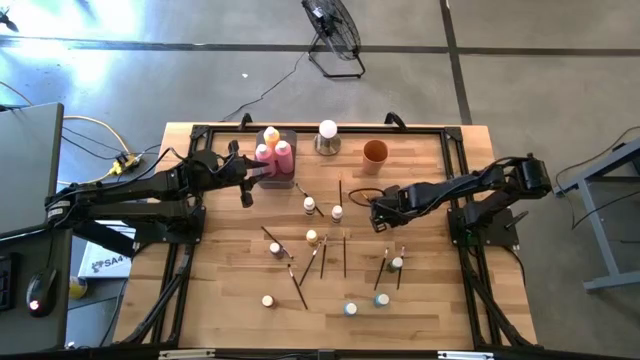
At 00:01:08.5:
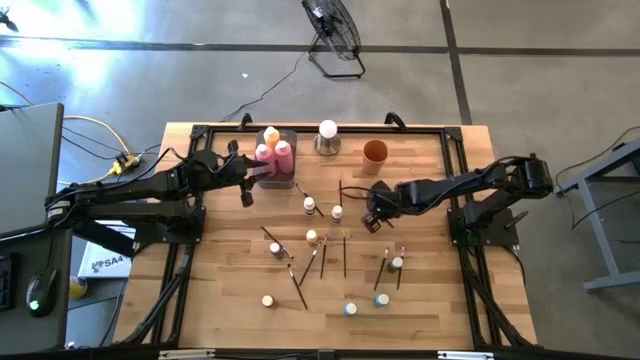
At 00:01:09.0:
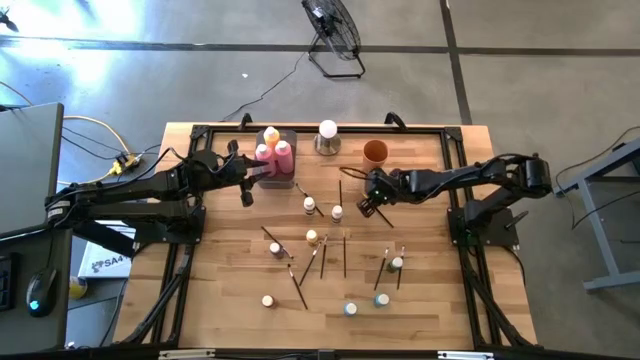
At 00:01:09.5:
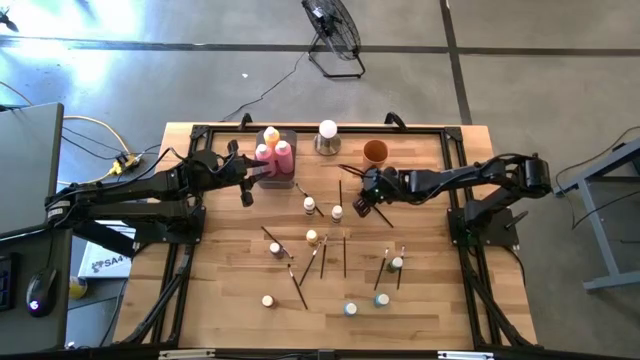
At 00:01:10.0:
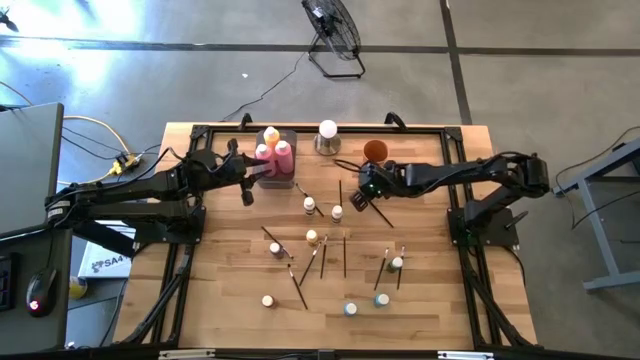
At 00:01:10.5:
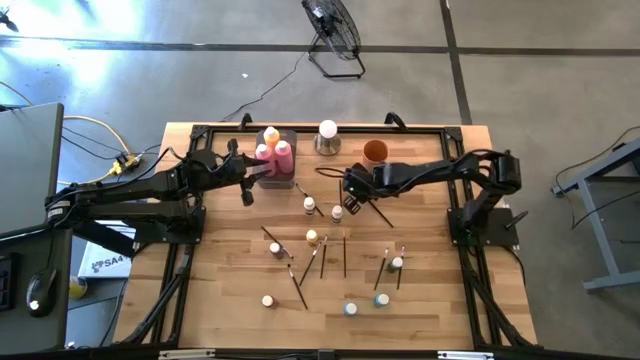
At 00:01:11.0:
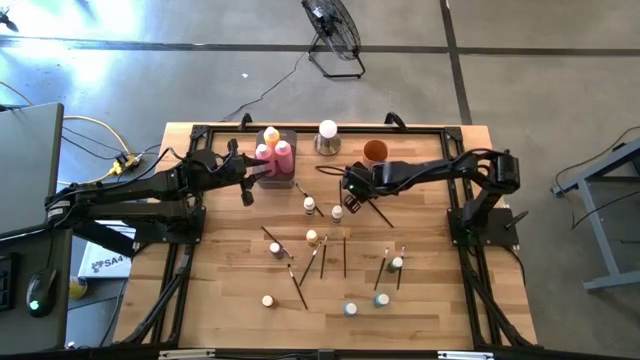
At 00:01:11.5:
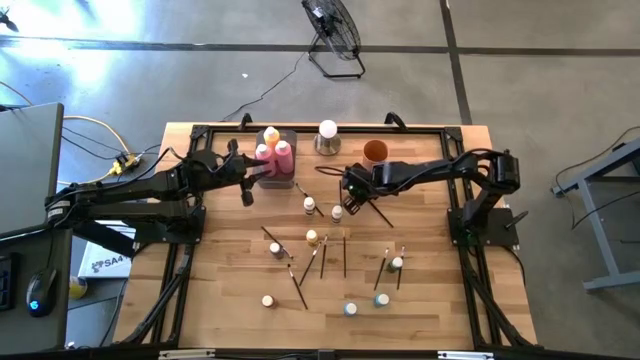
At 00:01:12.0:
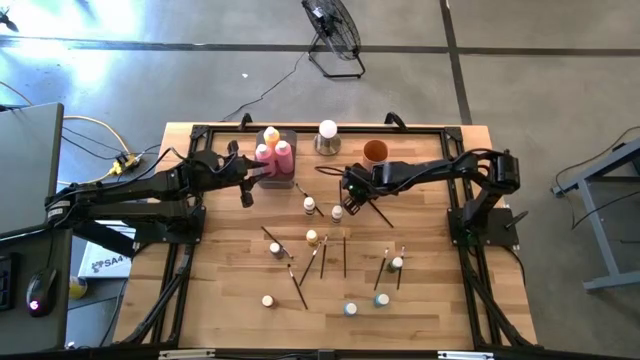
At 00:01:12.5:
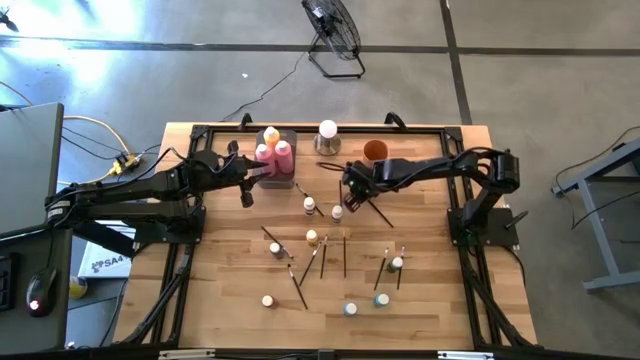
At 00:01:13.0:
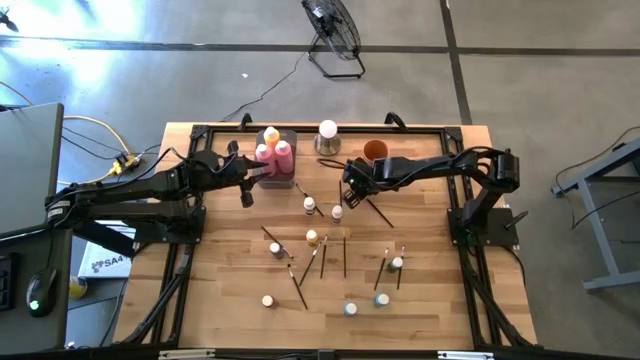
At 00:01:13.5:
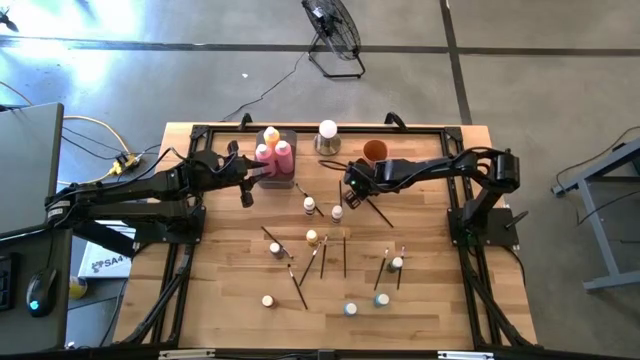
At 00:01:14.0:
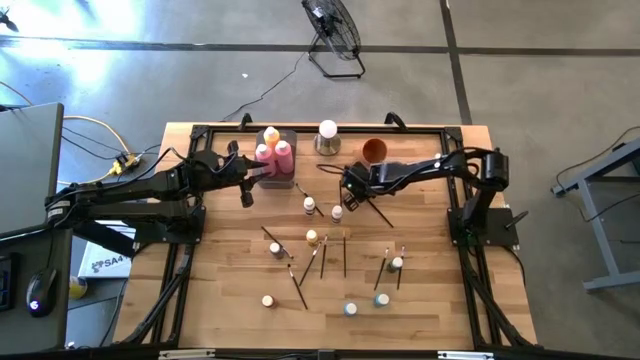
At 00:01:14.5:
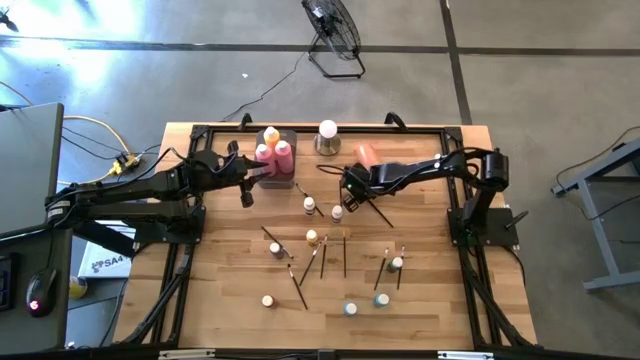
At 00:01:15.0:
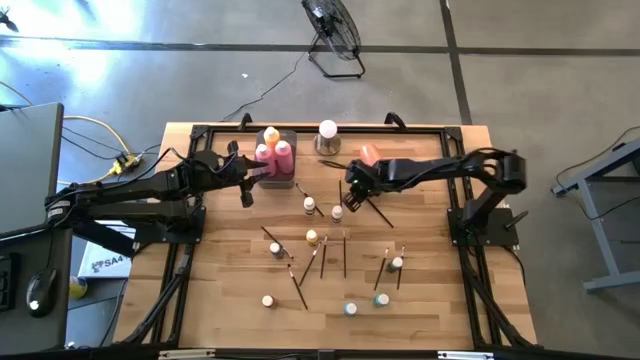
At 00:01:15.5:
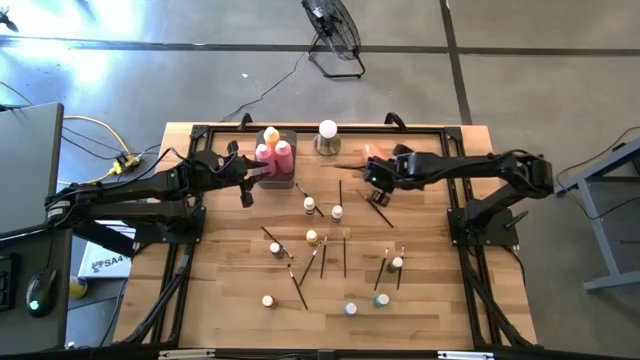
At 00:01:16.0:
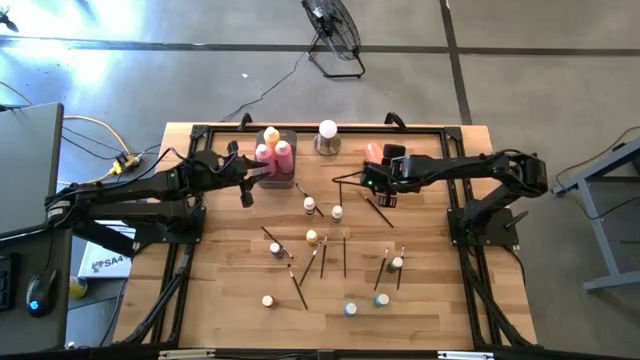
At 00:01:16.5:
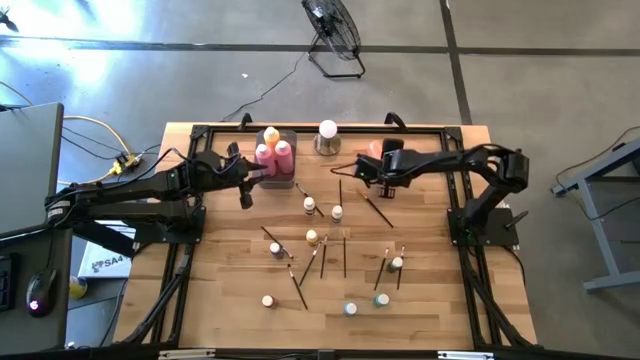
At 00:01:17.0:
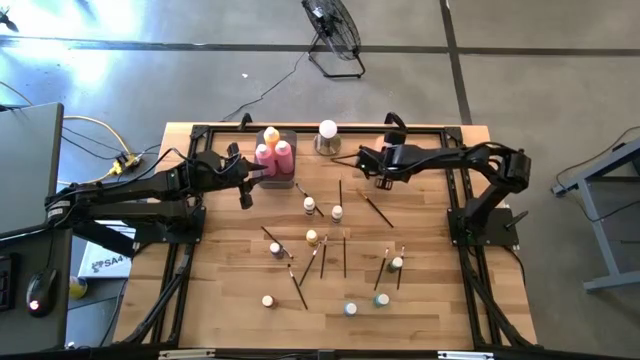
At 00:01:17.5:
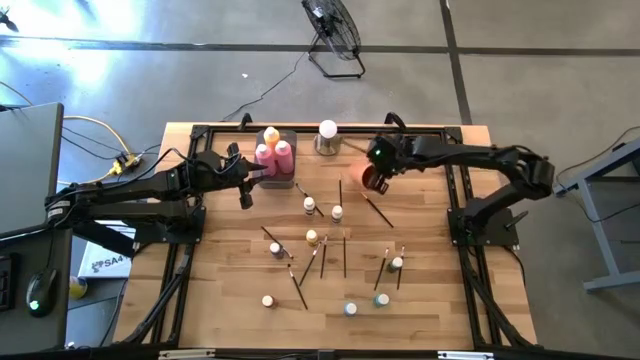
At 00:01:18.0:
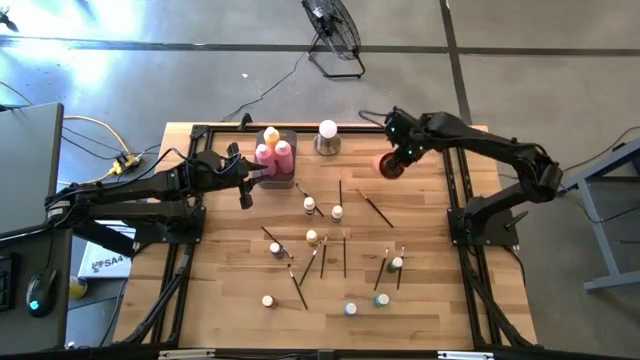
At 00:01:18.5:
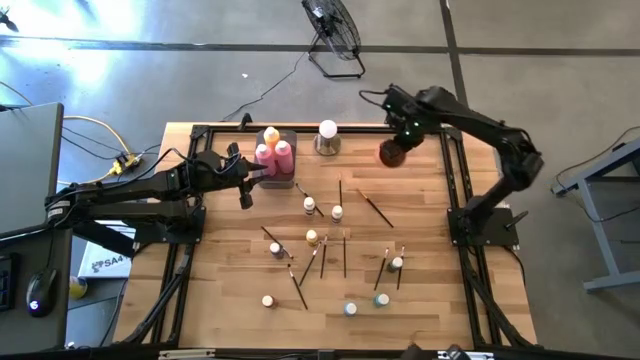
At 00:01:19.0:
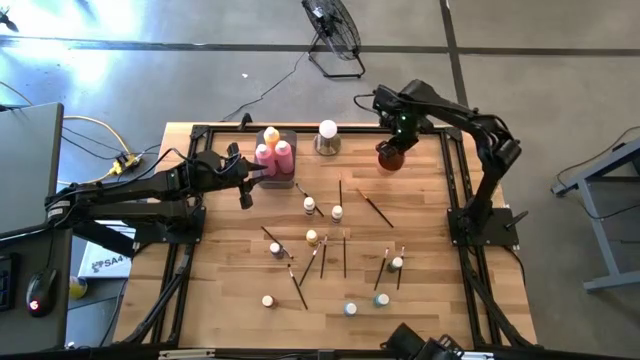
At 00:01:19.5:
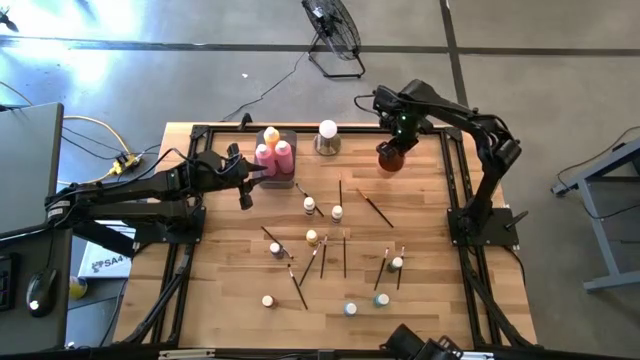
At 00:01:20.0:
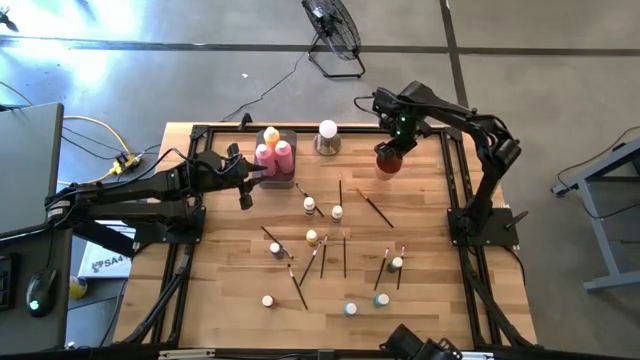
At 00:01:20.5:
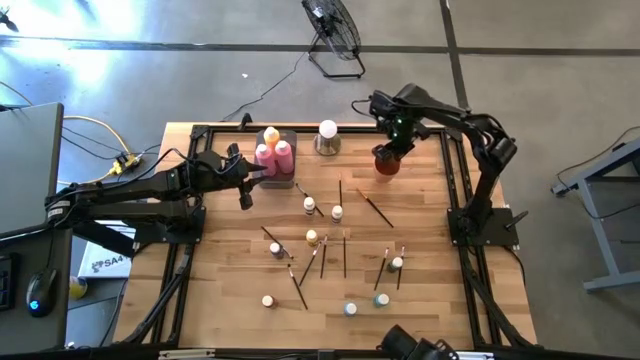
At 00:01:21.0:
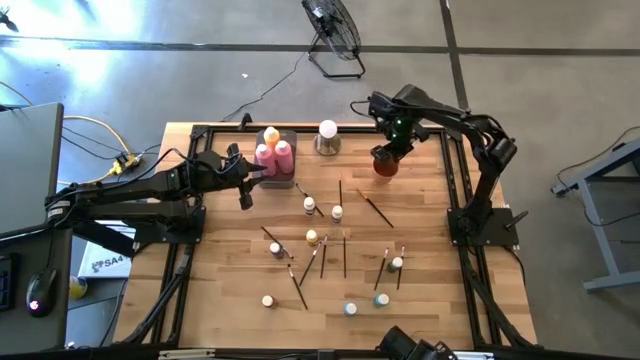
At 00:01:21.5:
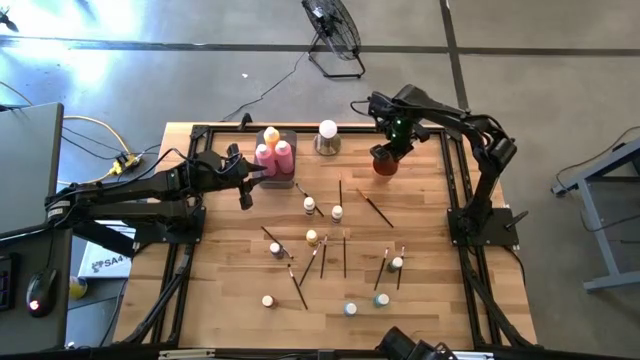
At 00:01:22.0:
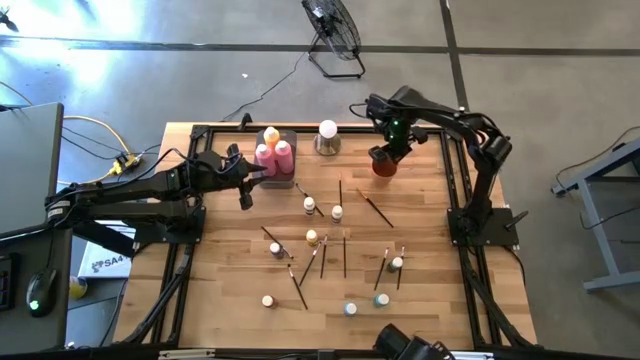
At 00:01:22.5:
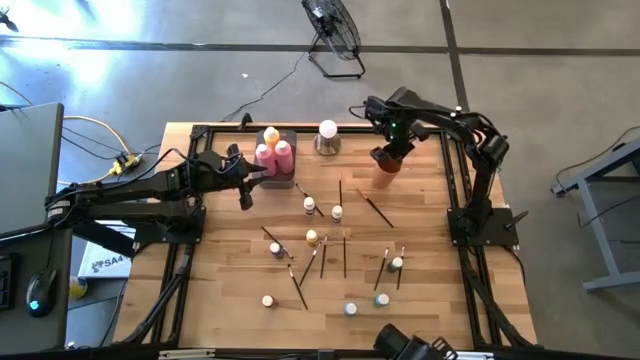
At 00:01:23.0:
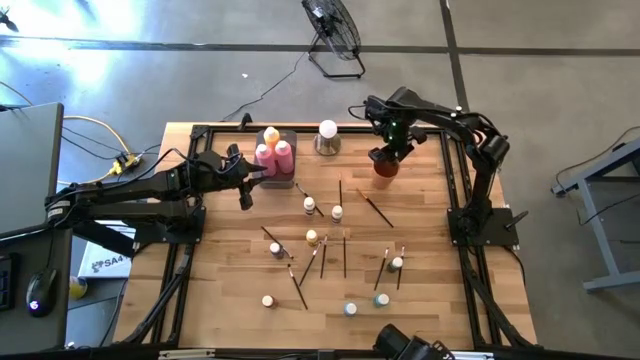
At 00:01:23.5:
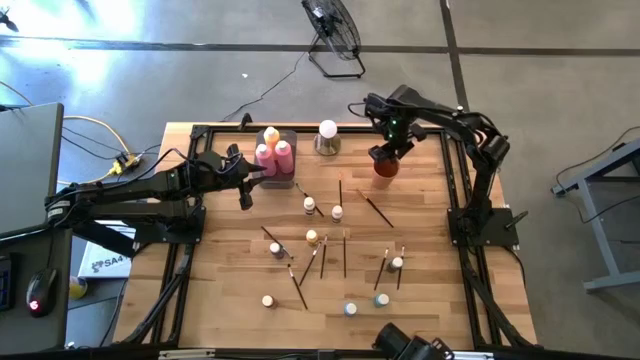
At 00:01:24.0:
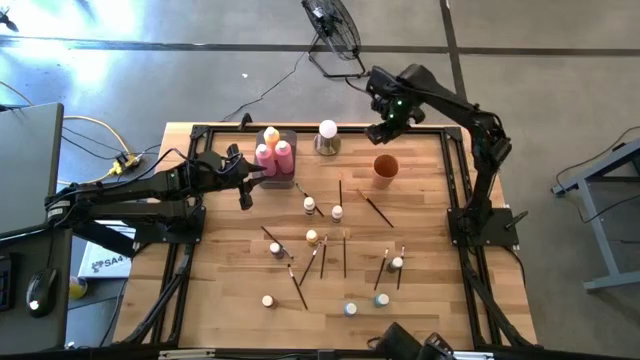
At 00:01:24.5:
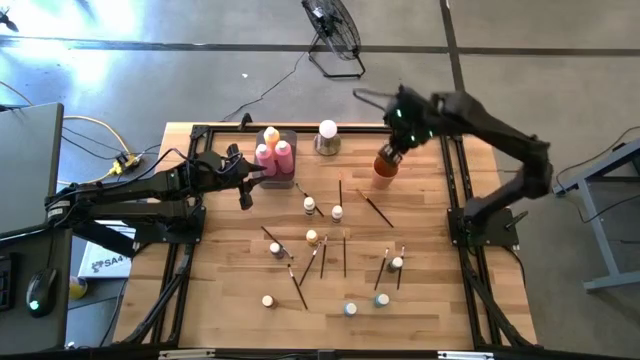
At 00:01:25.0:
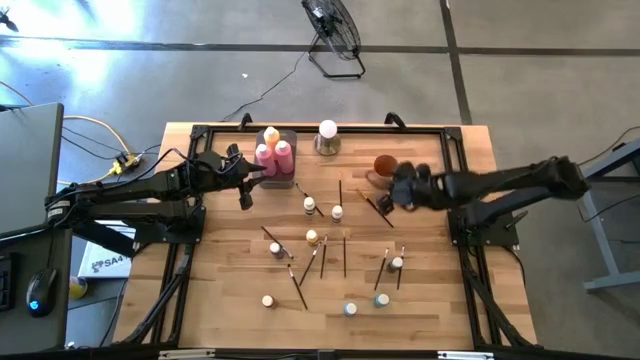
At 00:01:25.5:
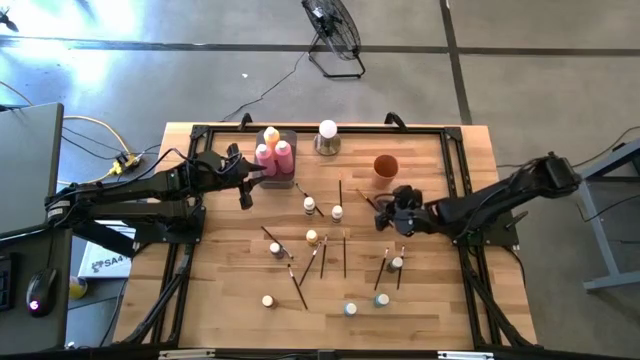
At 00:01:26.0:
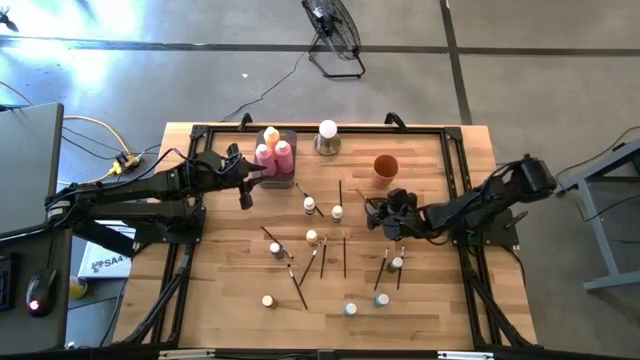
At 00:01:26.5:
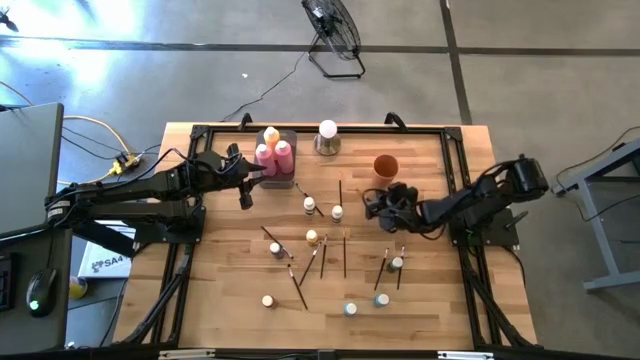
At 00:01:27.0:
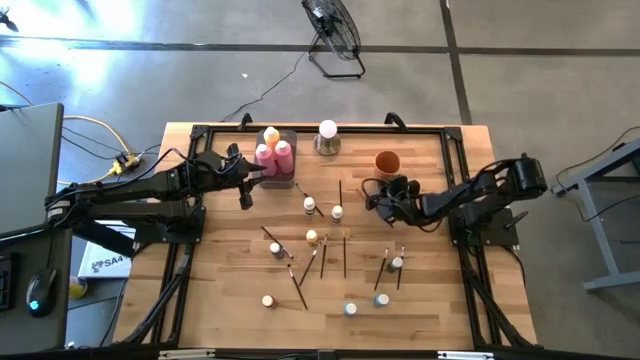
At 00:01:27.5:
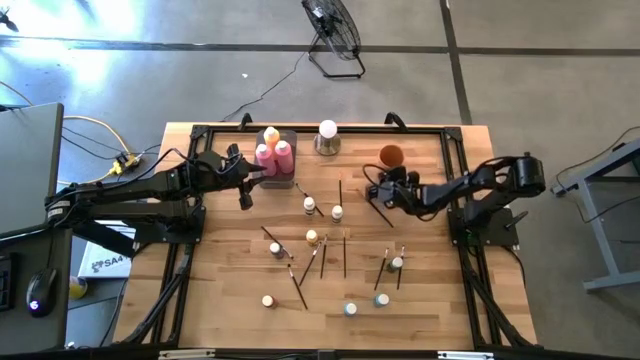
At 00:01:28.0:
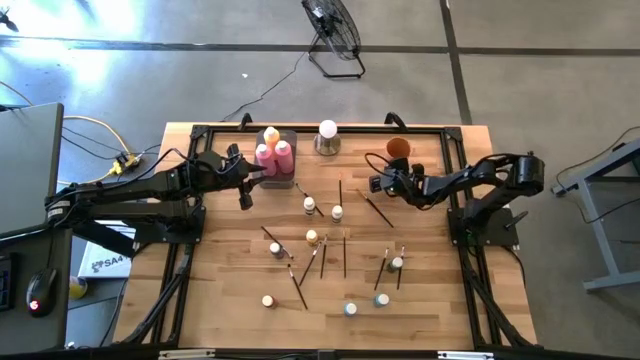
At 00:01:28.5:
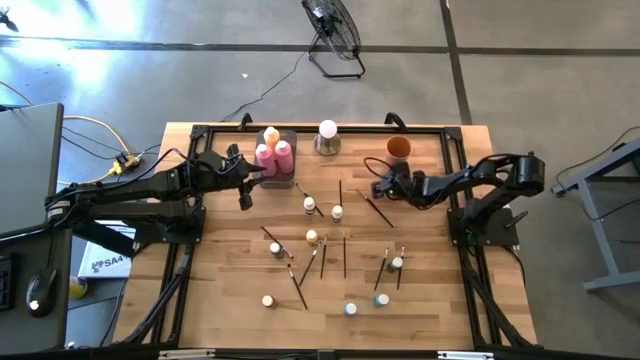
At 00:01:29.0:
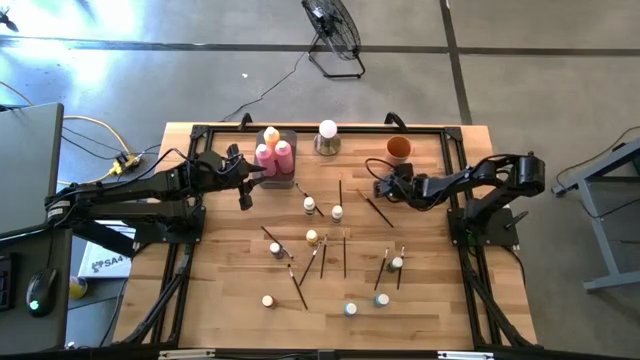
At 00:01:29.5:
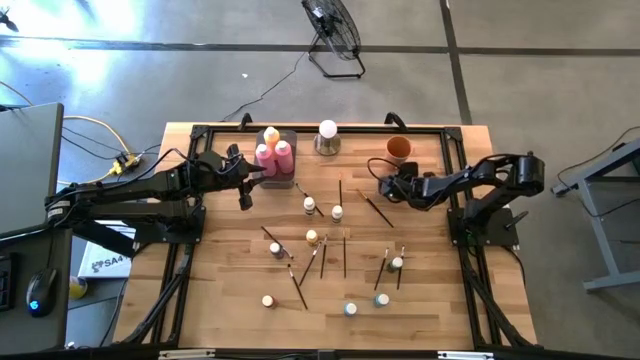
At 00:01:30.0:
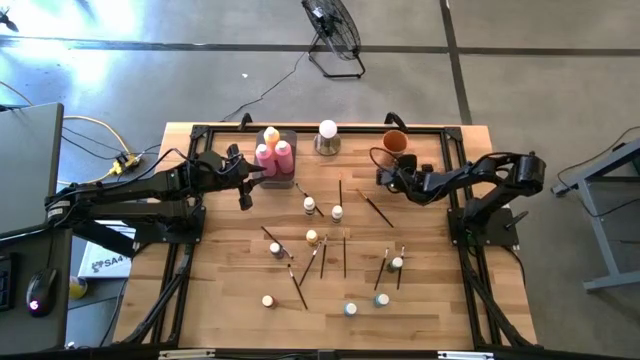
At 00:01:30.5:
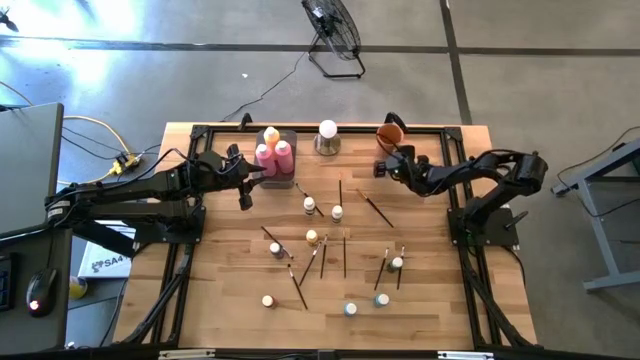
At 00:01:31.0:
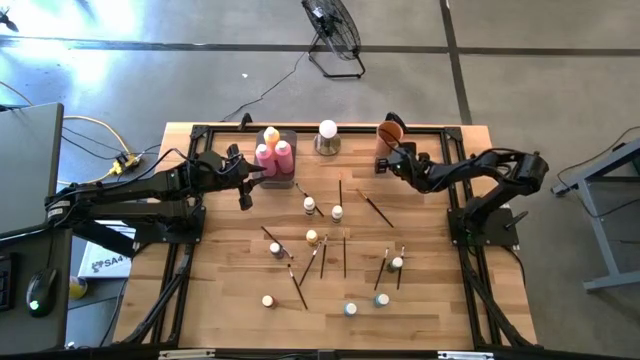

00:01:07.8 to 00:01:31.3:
Task: Pick & Place Paint Supplies
Adjust the orange cup
